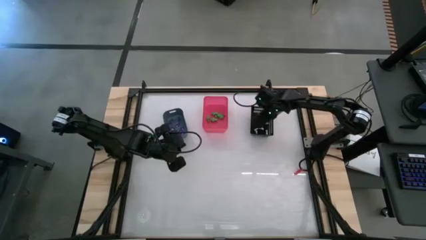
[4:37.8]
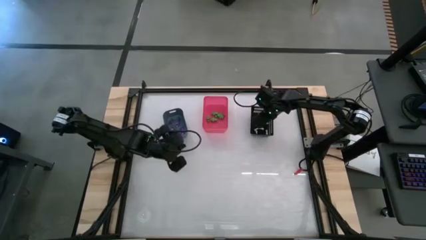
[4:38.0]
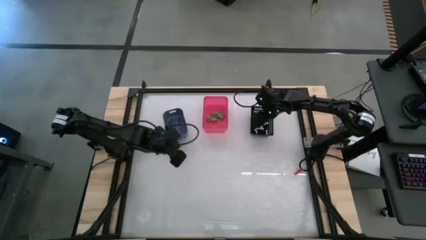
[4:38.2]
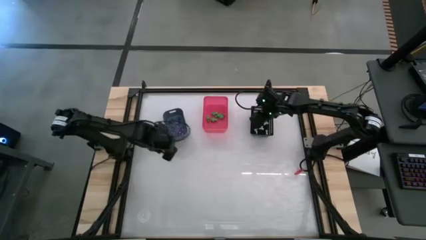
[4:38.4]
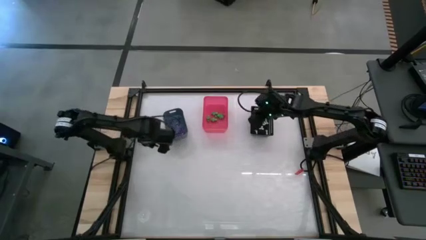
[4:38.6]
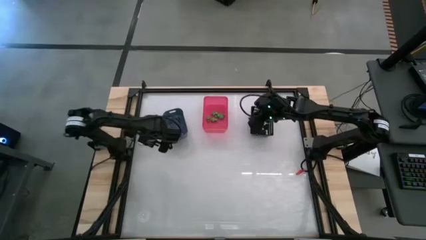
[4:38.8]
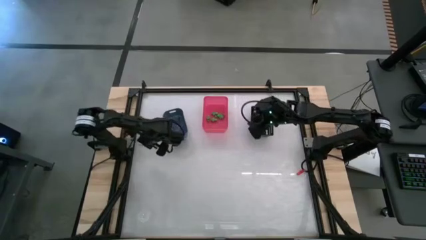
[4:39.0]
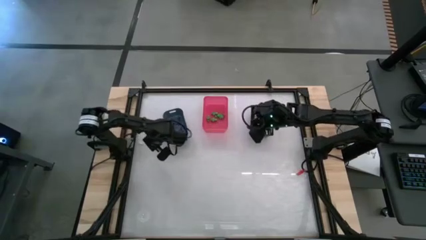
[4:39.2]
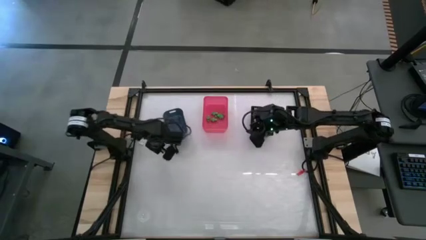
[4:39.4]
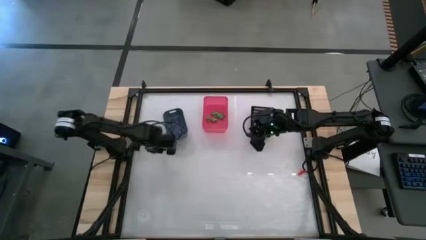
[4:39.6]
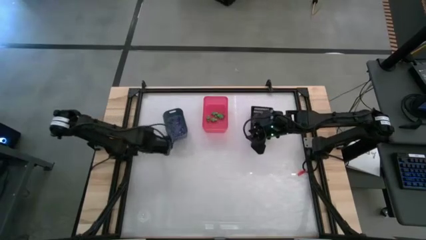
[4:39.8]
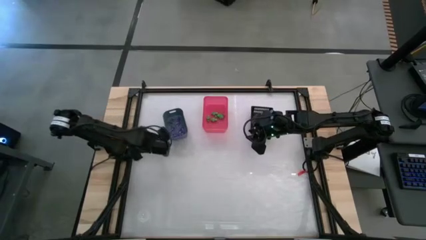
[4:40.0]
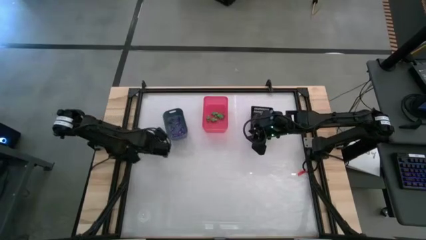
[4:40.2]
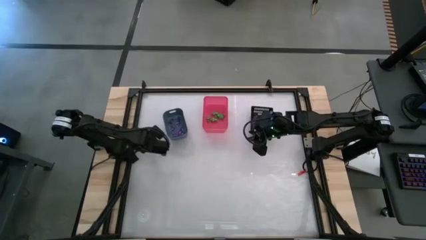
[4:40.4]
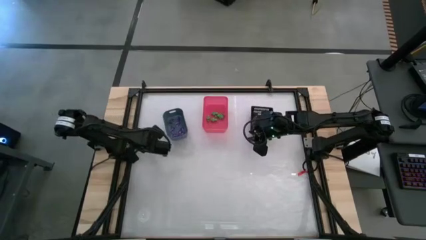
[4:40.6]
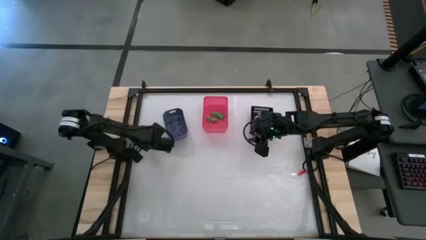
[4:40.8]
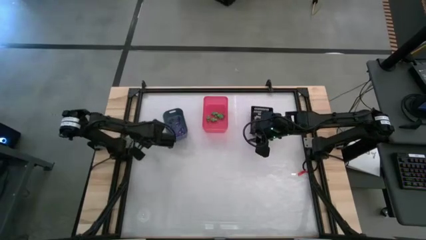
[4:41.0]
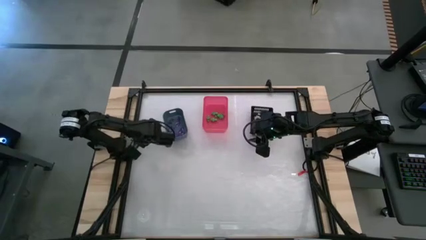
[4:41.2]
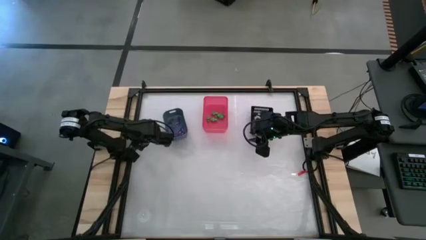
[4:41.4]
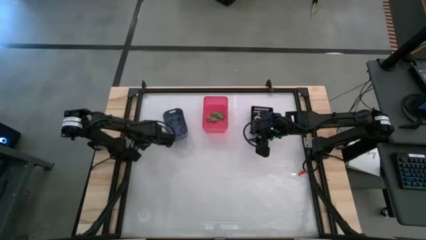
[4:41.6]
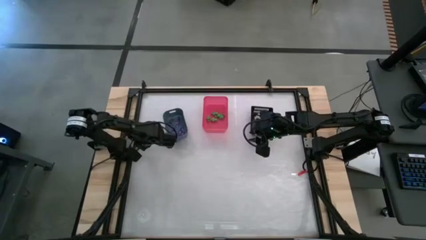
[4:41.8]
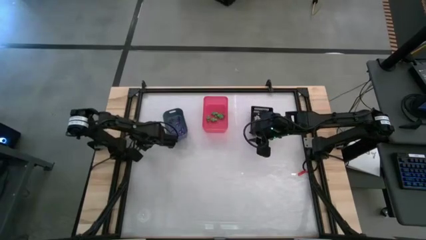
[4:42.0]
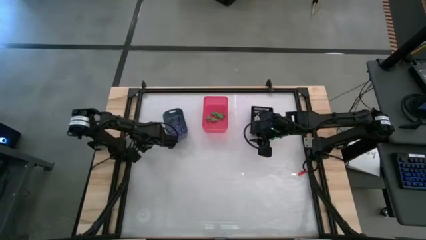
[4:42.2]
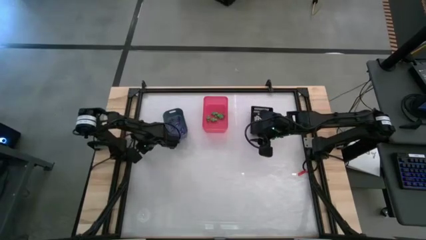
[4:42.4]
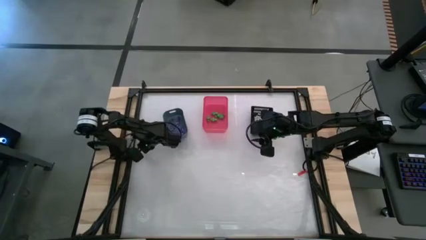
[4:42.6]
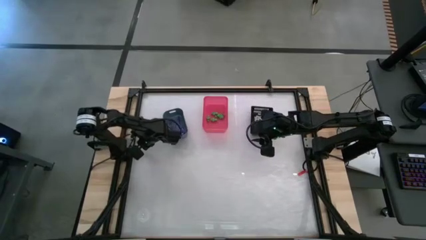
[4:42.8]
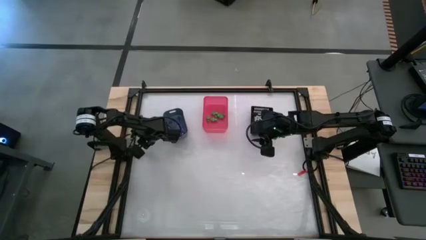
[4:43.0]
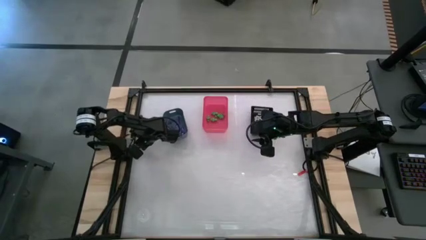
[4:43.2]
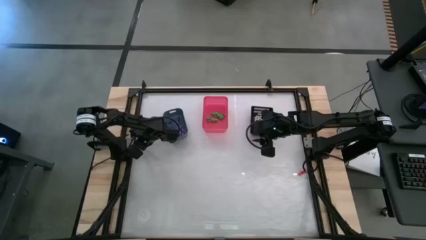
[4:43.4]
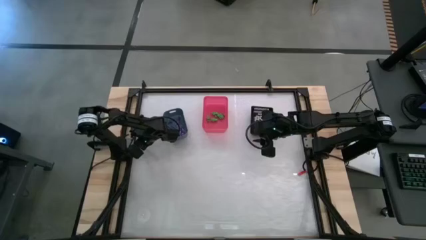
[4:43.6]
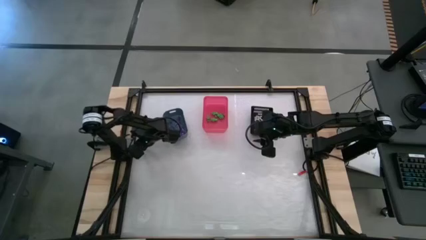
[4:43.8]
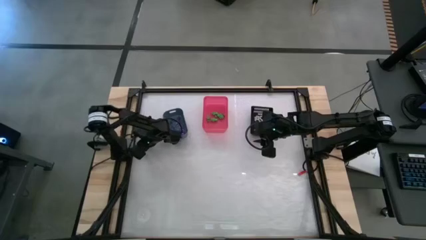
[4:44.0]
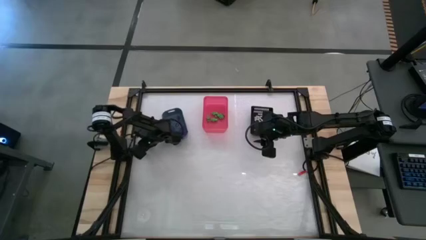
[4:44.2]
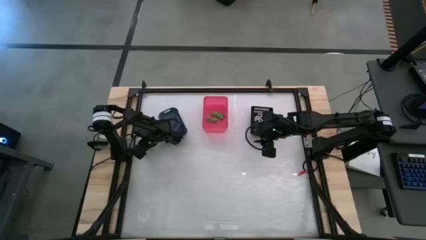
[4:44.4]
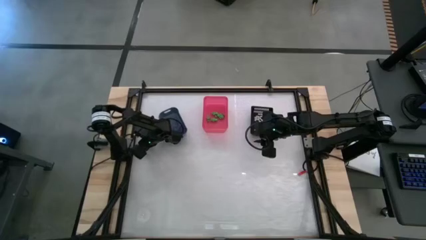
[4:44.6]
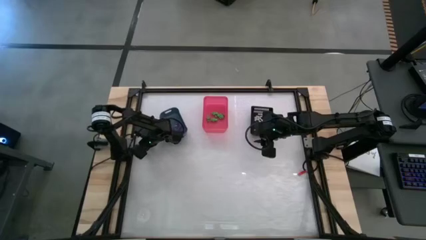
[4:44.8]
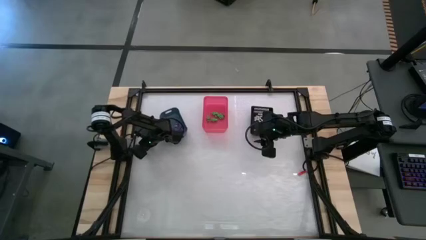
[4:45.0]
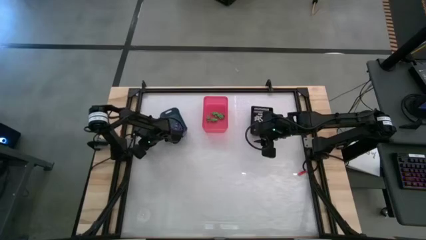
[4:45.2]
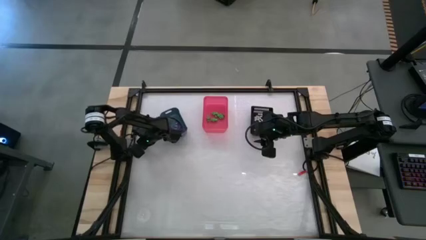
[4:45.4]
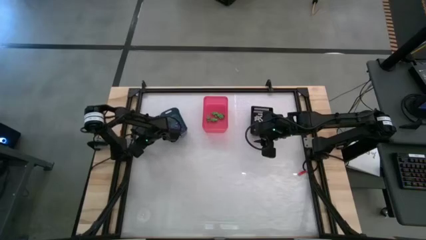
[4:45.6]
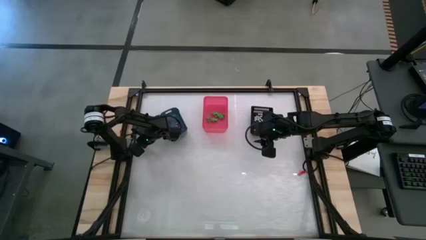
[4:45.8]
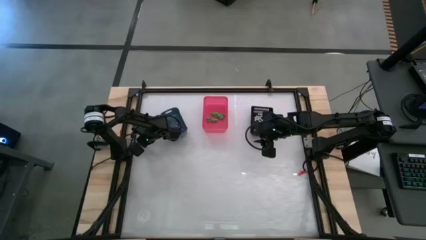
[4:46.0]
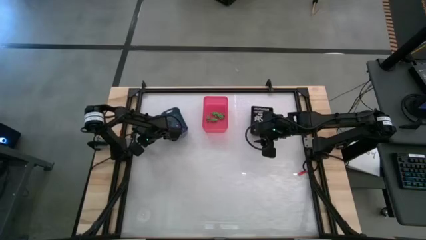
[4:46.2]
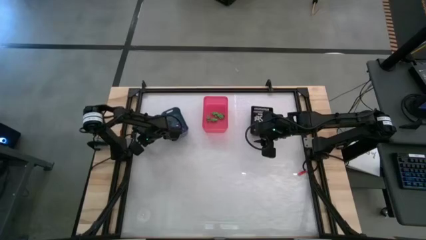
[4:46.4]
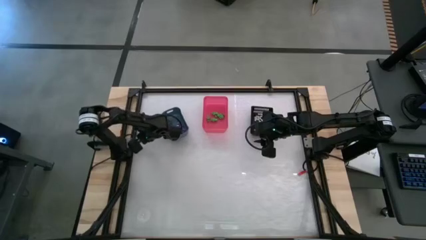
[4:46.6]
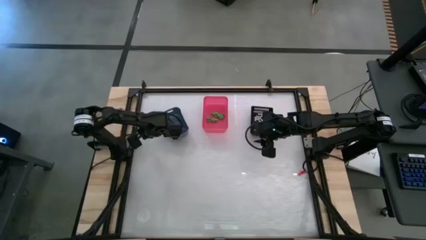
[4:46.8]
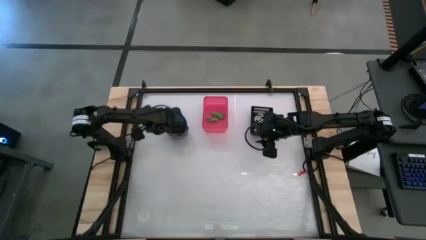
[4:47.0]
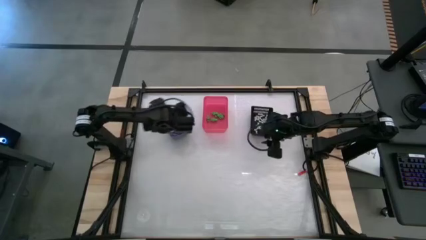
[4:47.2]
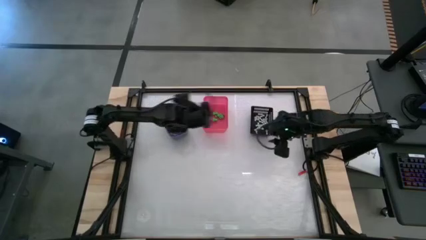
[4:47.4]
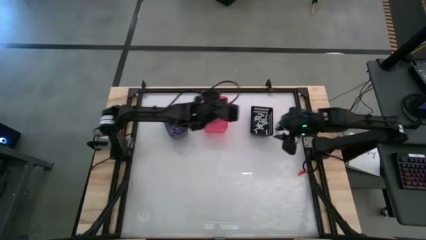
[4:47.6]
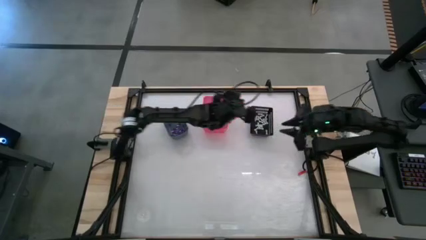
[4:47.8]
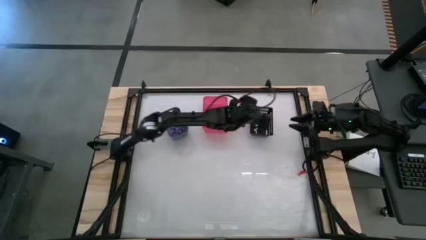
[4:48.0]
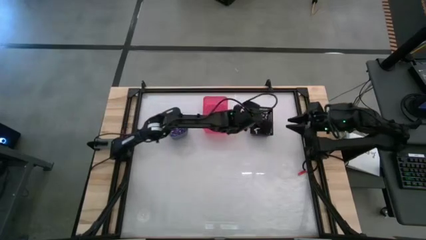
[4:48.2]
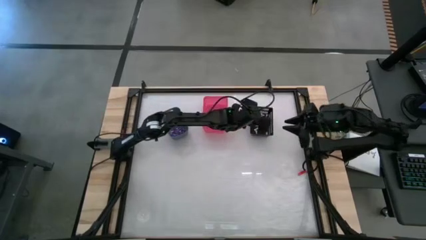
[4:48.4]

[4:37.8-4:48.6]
Task: Sort Halloween decoration
Put the white bone toy into the black bin

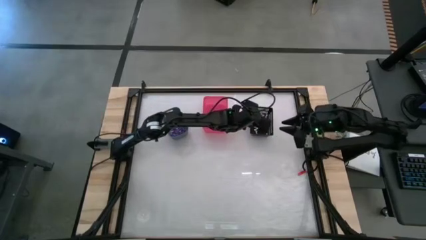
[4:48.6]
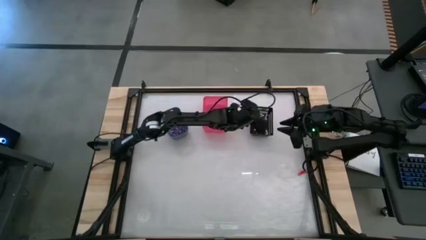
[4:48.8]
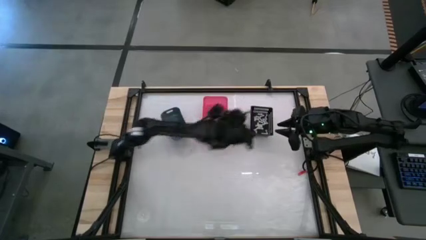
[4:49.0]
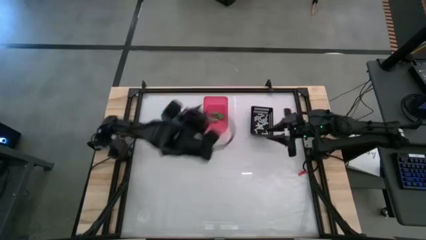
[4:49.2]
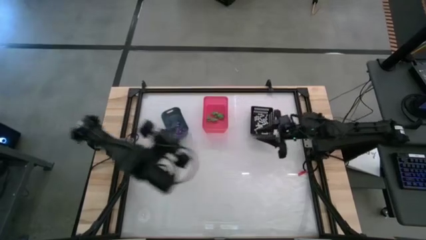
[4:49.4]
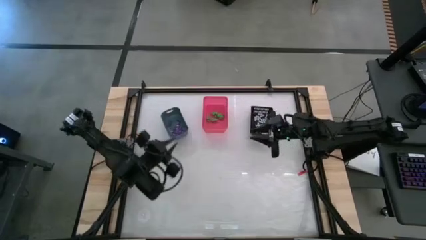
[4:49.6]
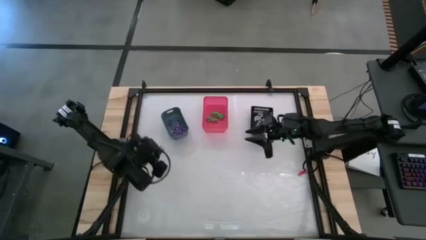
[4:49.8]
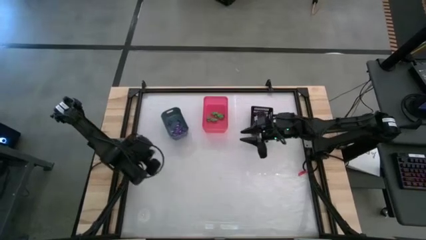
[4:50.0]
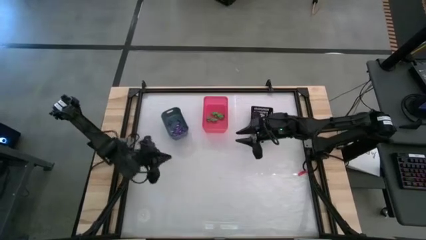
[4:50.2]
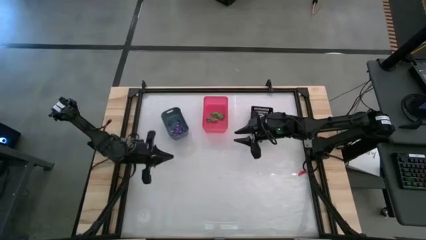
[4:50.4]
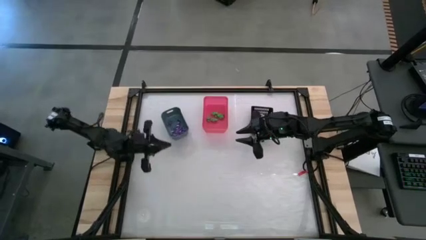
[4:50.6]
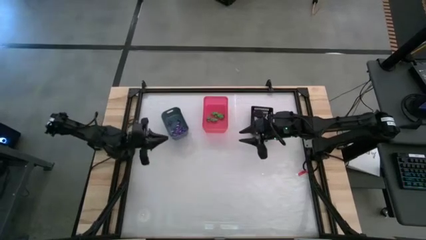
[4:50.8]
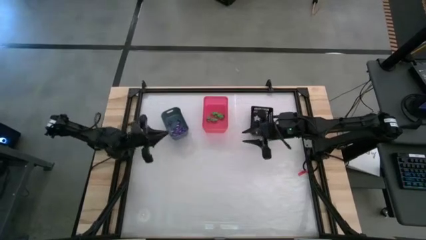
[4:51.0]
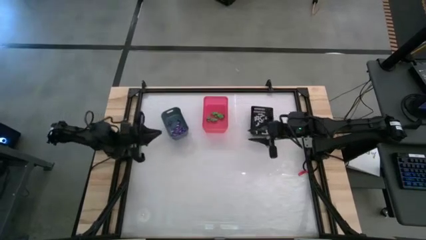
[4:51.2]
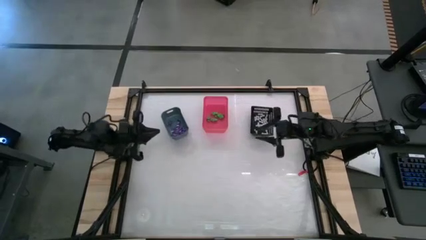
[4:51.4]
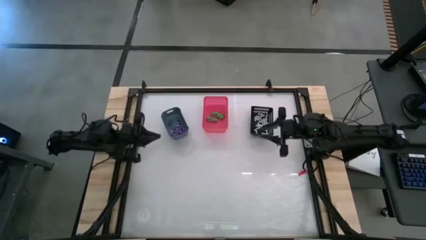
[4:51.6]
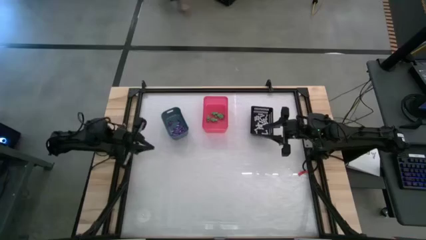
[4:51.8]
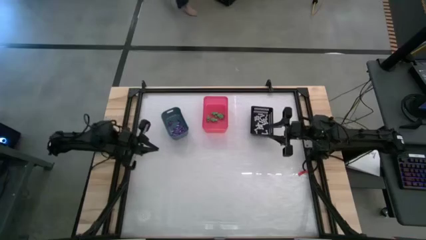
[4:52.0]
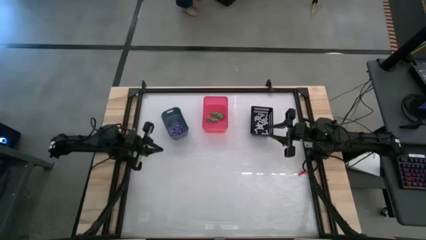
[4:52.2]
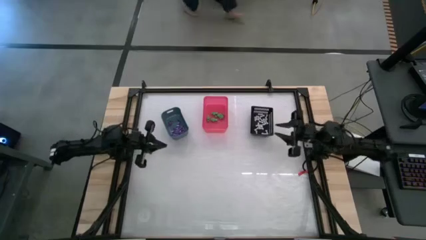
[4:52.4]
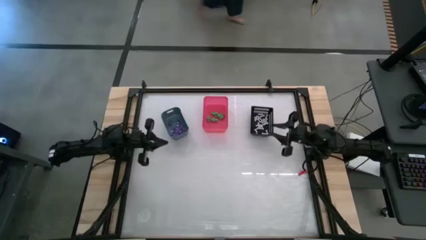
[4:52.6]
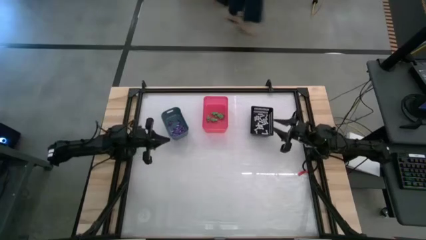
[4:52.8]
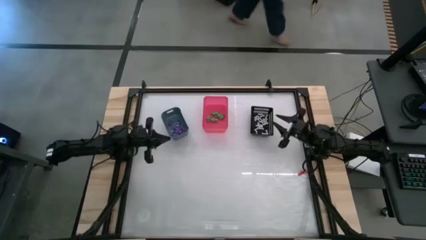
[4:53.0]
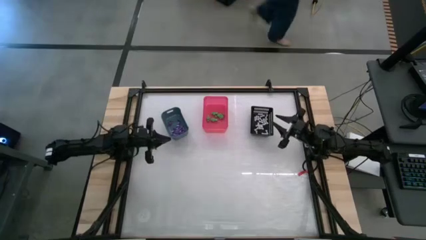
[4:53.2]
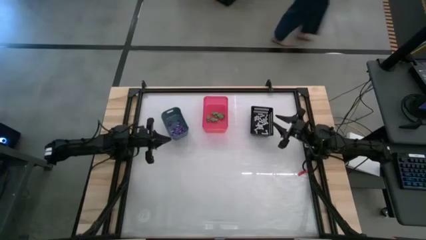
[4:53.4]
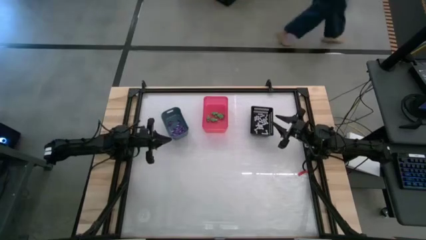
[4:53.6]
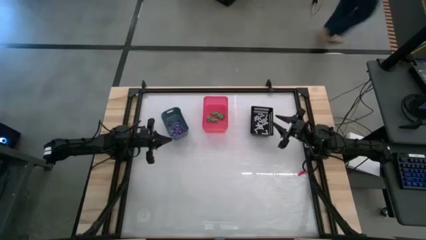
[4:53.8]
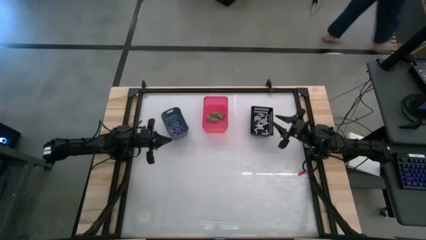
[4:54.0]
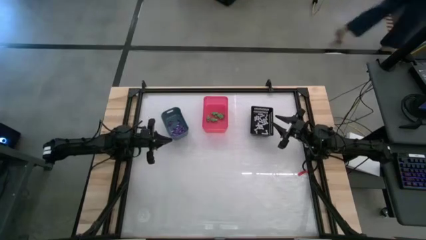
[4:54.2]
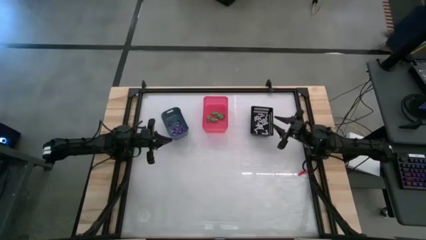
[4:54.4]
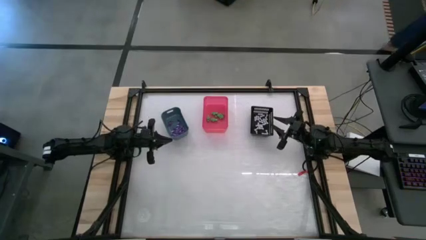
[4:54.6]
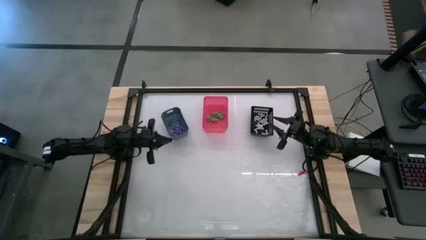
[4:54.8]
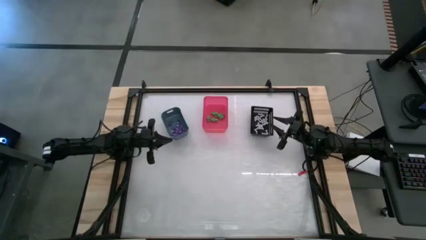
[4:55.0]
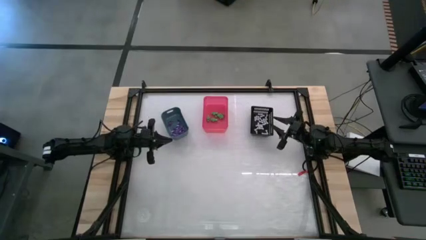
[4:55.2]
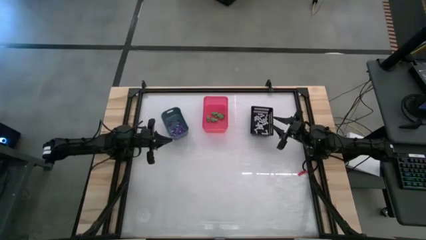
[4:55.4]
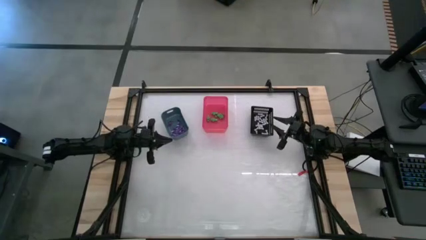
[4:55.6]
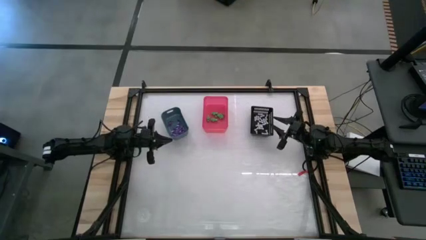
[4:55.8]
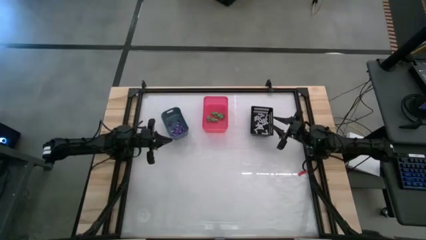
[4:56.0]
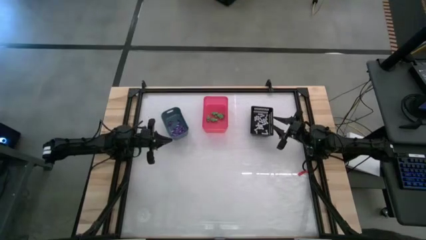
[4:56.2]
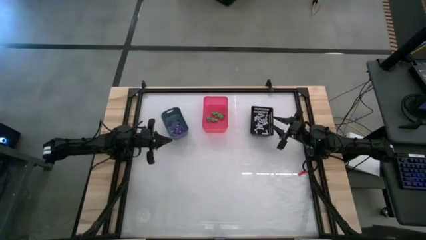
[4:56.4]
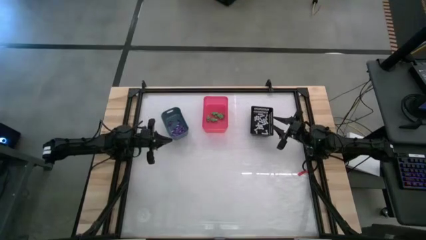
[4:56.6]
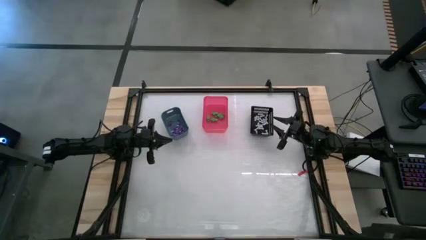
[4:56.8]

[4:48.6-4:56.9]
Return to Home Position
